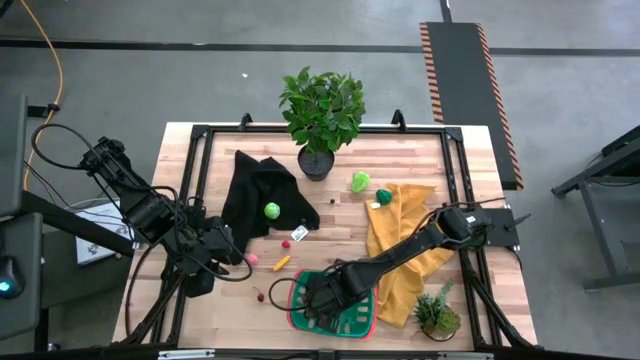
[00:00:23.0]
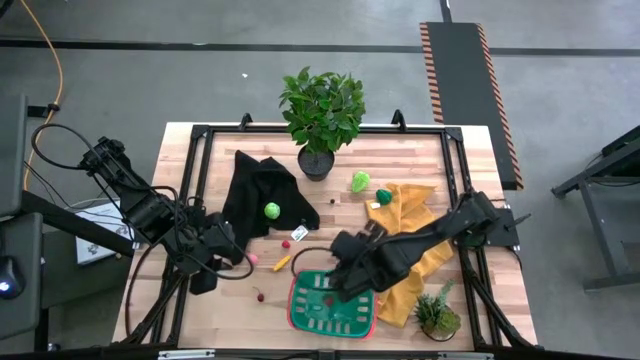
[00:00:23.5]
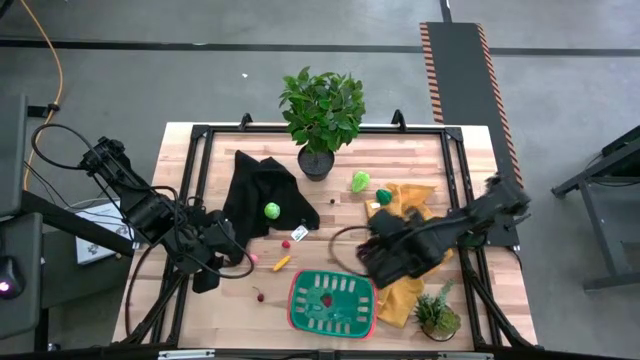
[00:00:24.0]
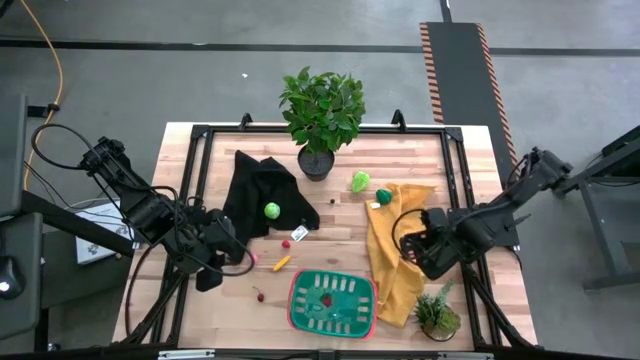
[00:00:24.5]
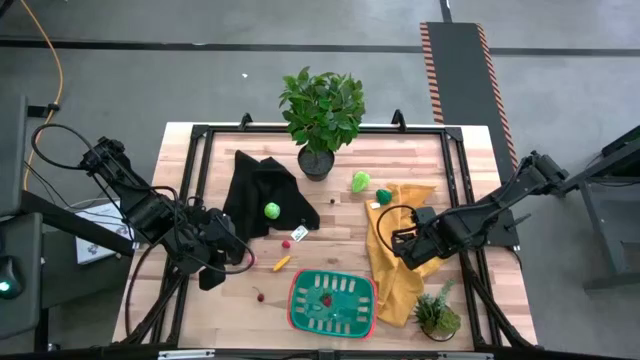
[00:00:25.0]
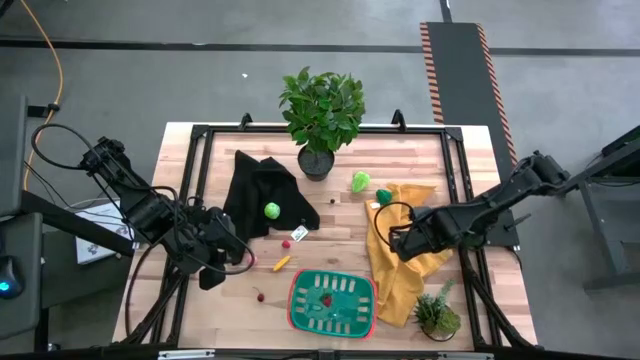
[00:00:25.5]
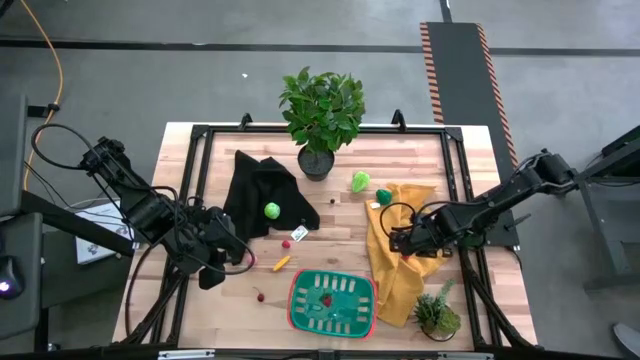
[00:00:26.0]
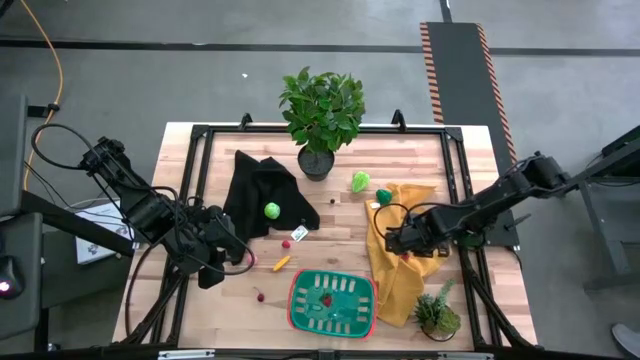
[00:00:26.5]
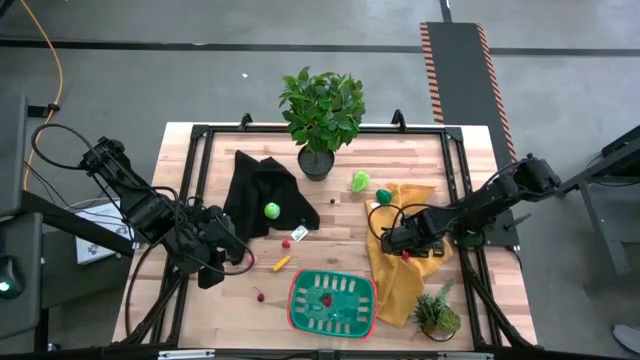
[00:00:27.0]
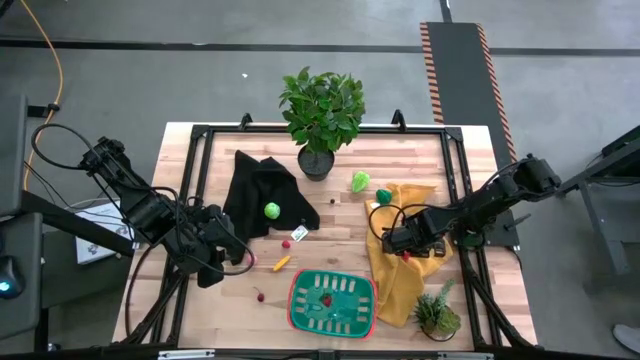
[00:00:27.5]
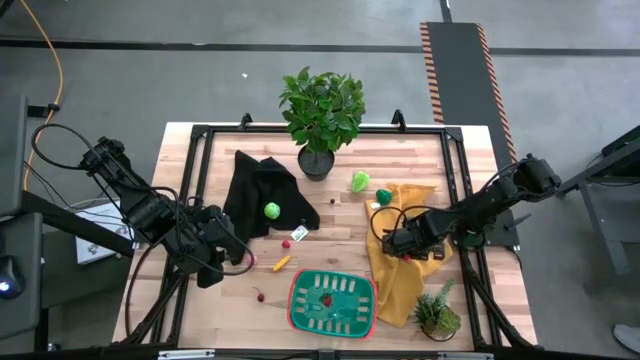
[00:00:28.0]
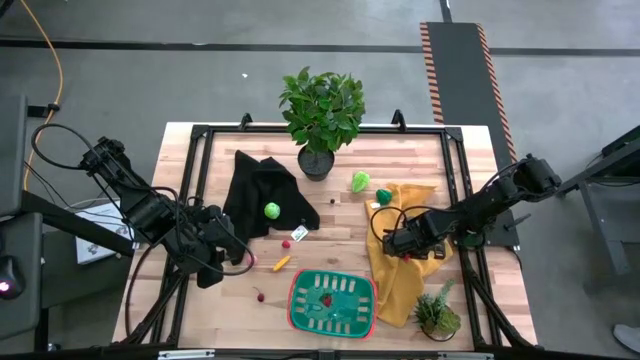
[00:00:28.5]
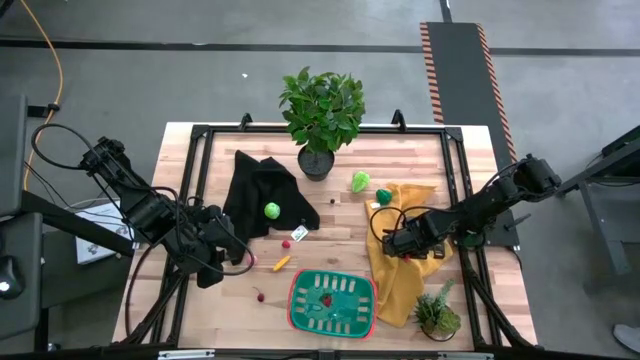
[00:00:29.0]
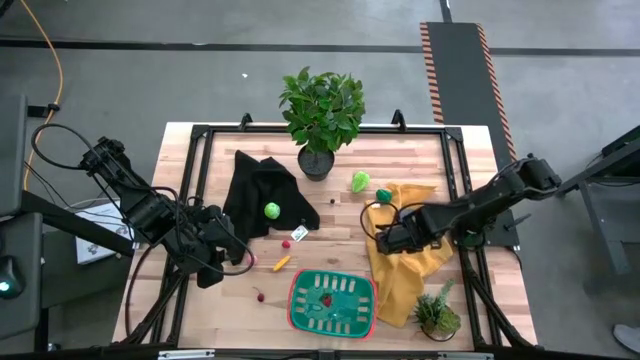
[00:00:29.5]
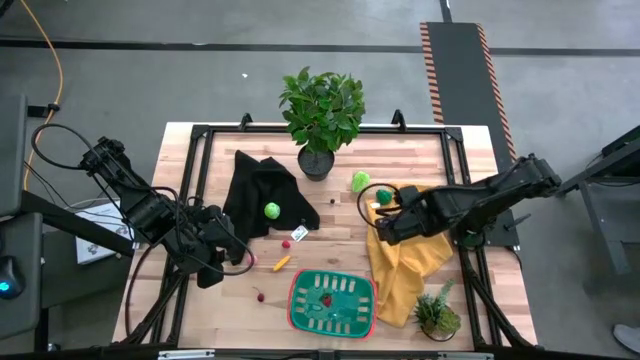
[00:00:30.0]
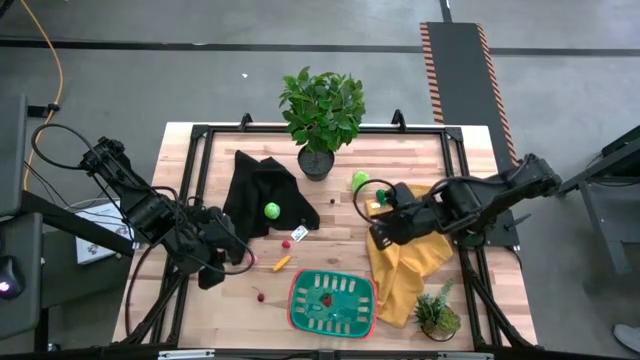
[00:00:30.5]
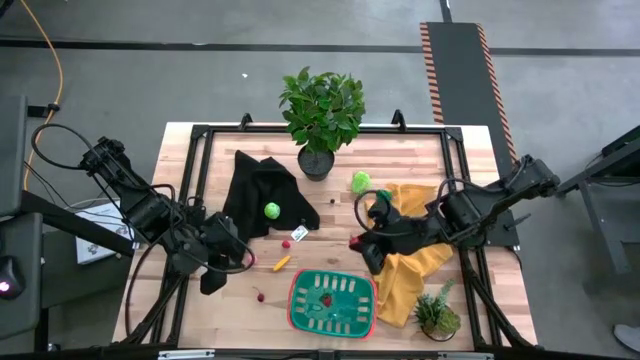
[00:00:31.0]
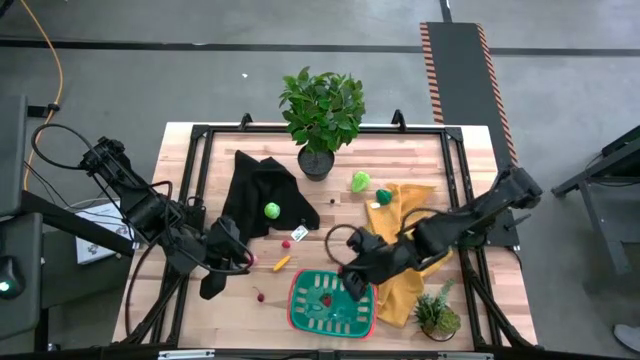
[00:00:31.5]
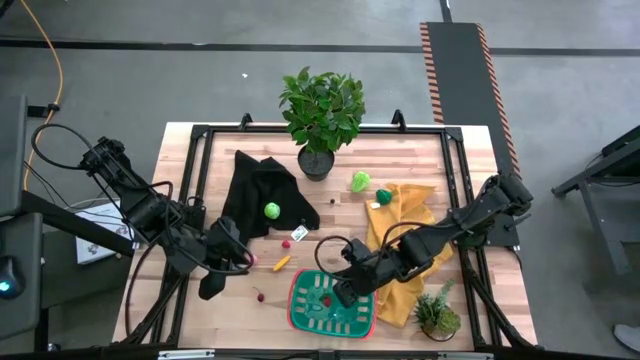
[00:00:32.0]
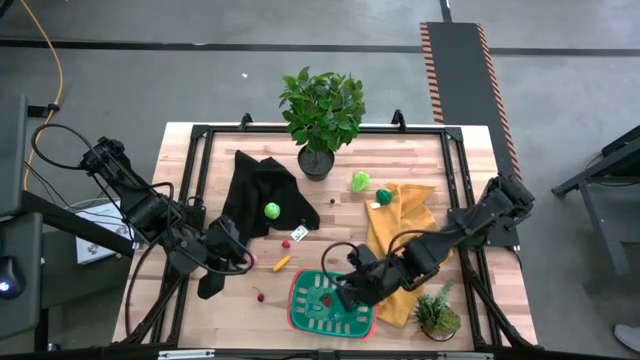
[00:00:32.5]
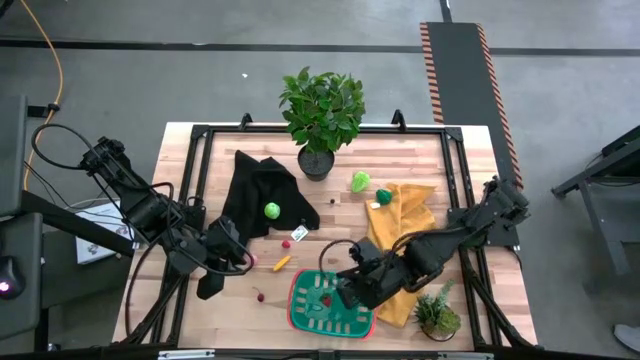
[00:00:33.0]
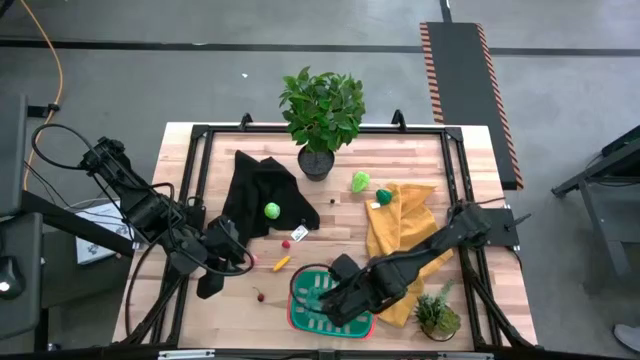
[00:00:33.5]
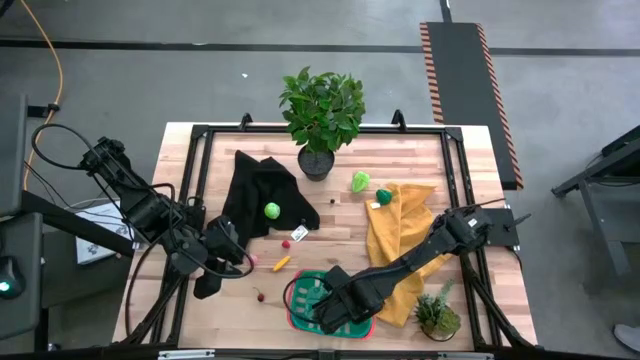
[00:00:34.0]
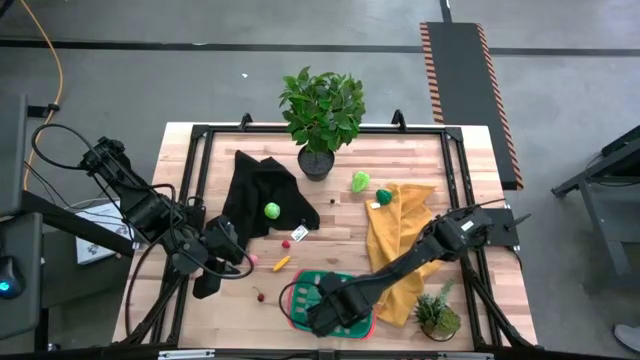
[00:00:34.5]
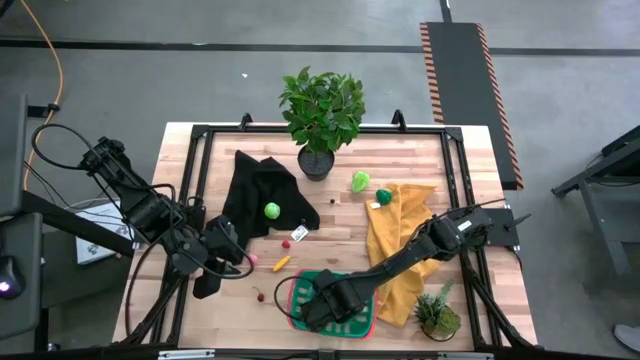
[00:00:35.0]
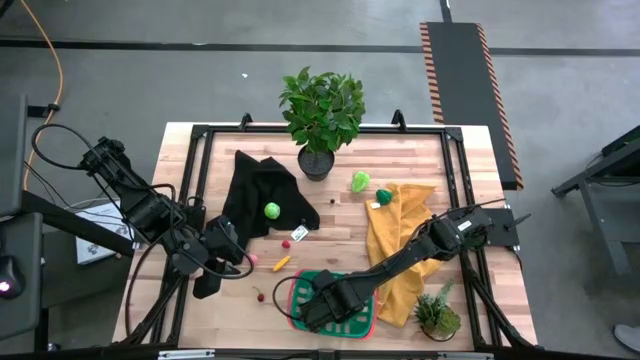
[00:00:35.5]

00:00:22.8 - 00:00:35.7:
Task: Pick and placing Produce into tupperware
Put the top red cherry into the blue bin

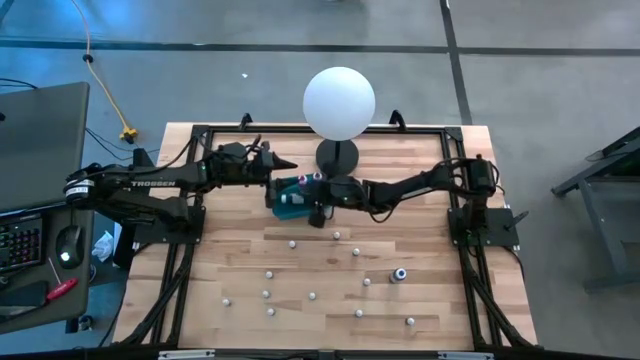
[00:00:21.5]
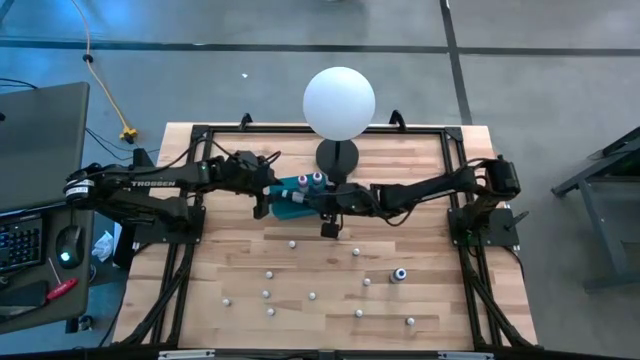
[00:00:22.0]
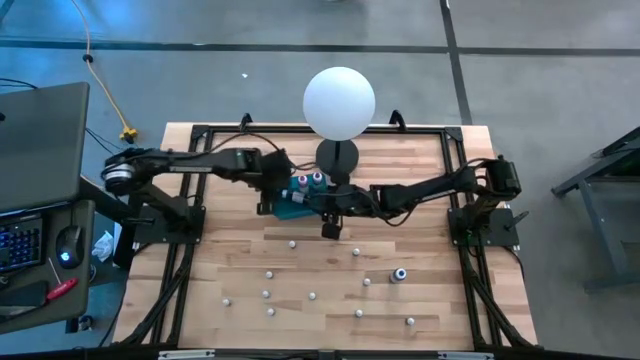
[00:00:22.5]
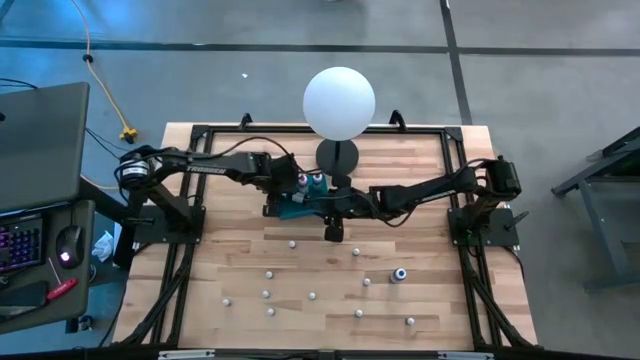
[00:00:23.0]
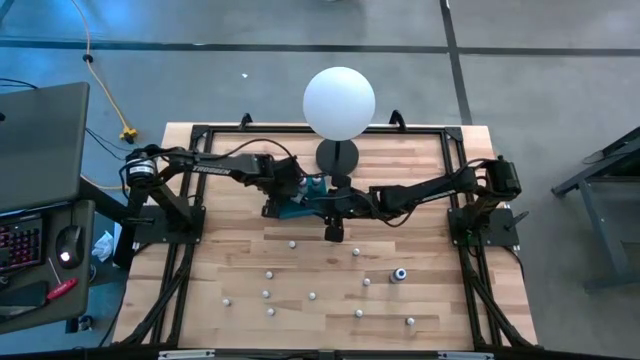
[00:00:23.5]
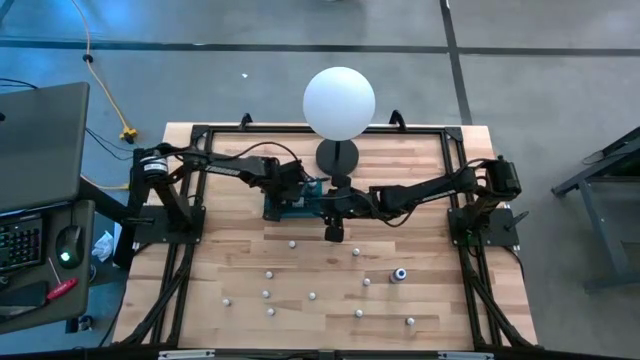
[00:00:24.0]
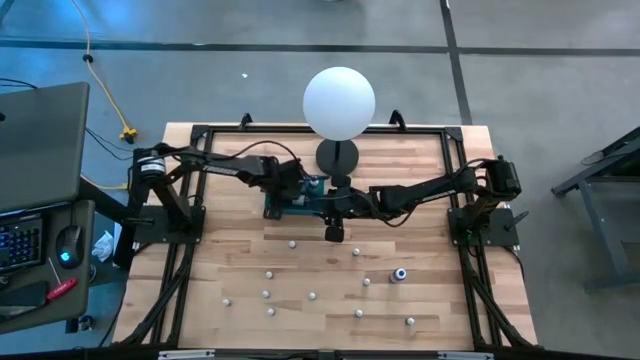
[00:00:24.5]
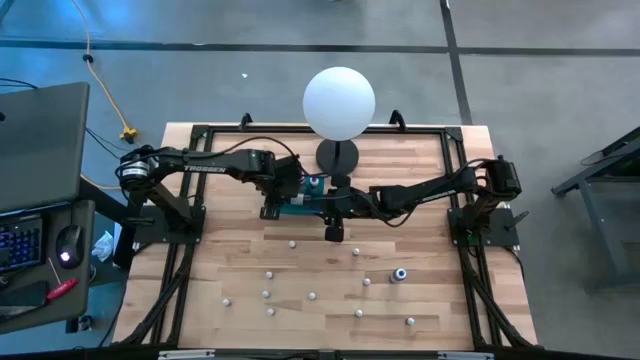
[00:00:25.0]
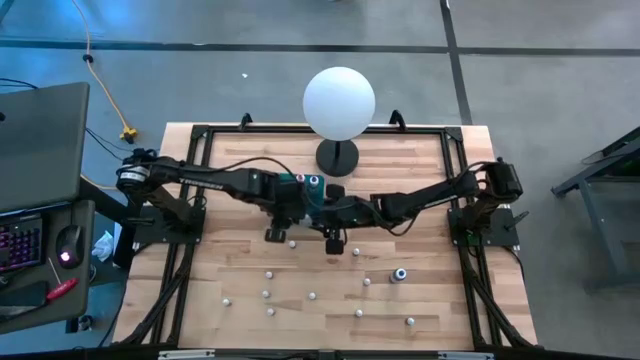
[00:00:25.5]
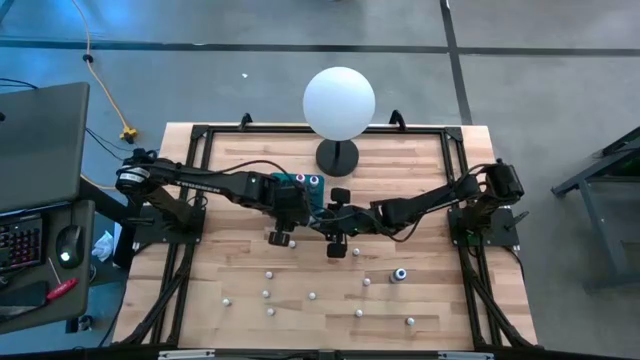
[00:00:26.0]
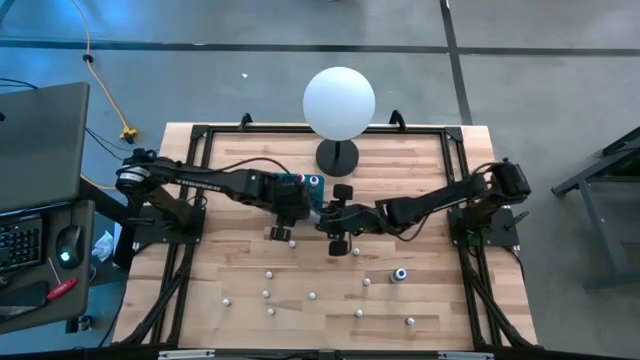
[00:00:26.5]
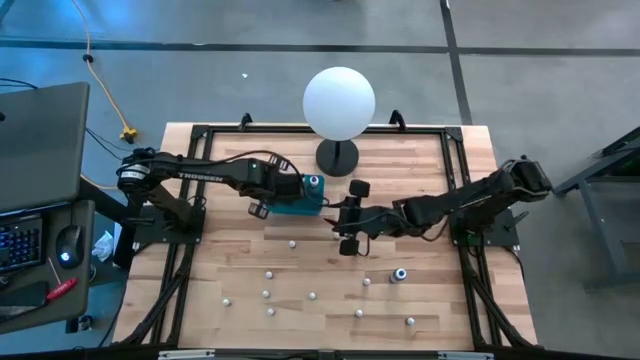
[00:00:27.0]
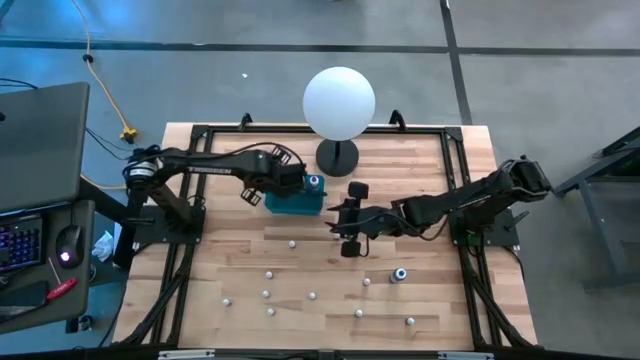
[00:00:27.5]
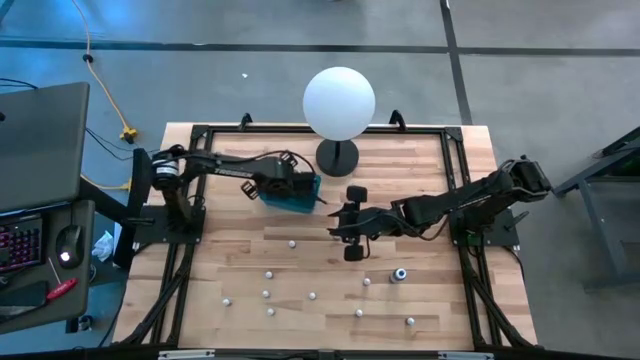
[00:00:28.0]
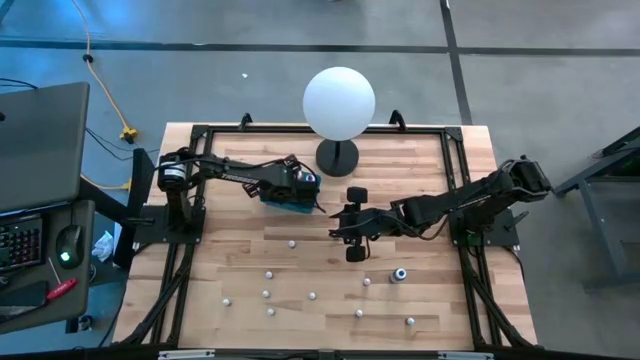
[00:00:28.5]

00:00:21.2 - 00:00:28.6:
Task: Pick & Place food coloring
Put the large black food coloring bottle into the blue bin
